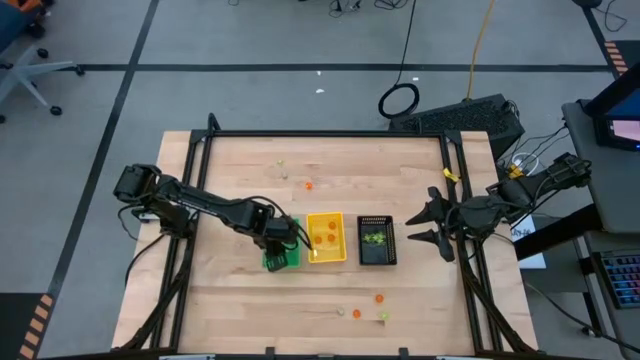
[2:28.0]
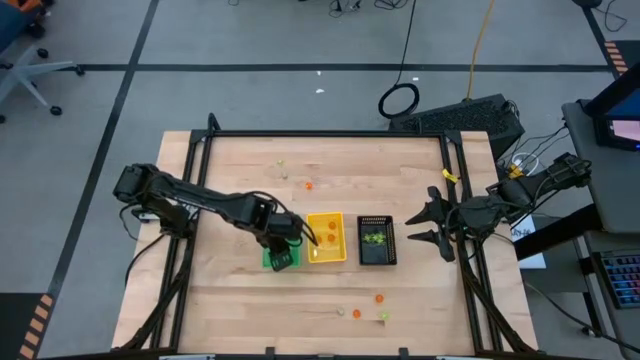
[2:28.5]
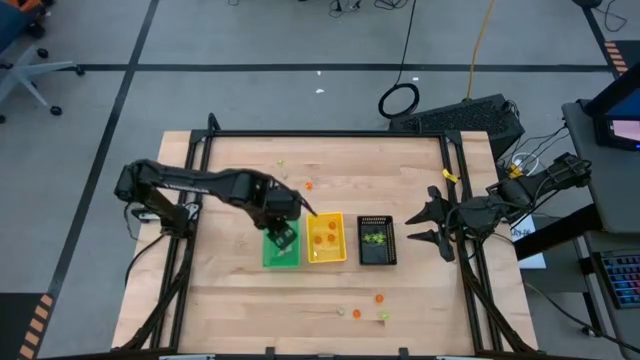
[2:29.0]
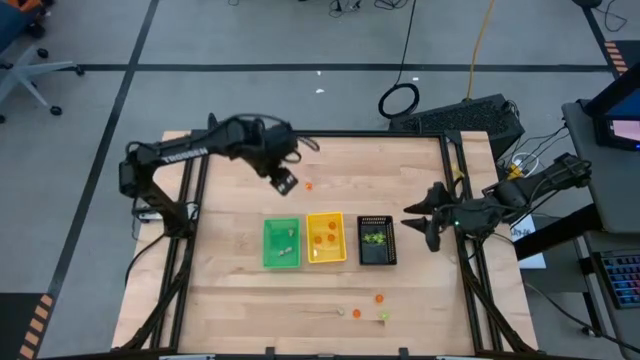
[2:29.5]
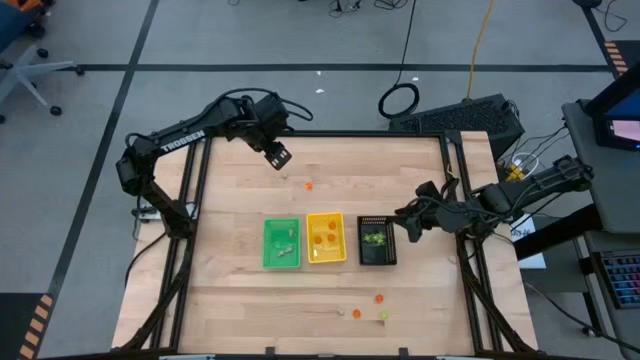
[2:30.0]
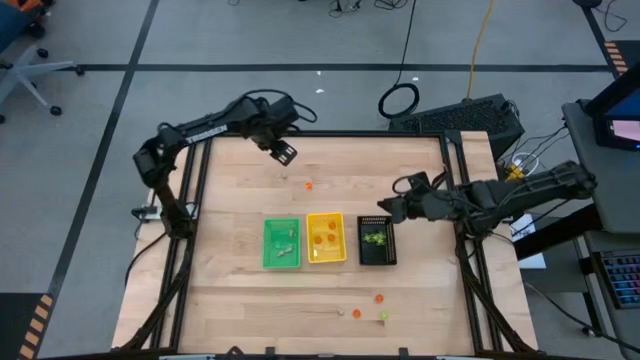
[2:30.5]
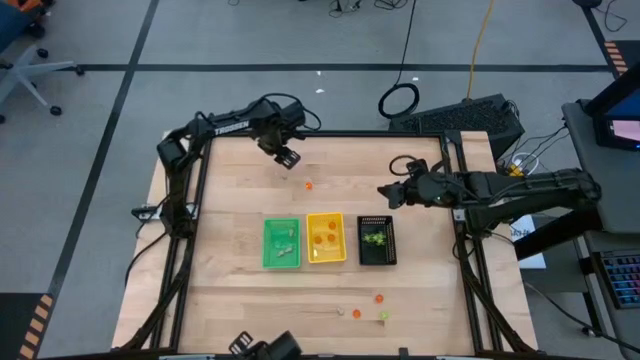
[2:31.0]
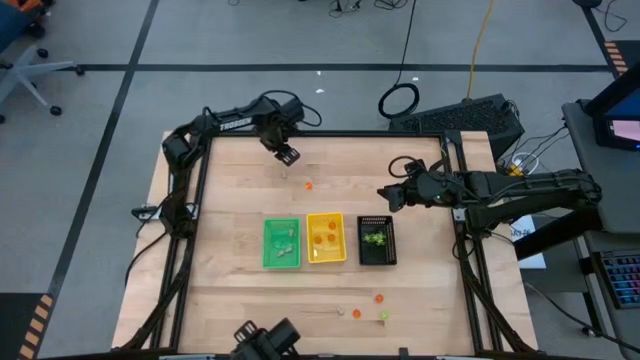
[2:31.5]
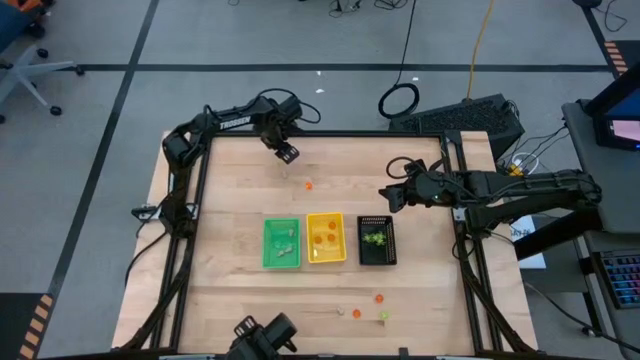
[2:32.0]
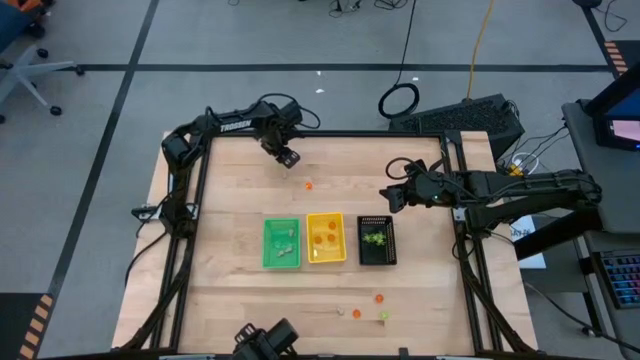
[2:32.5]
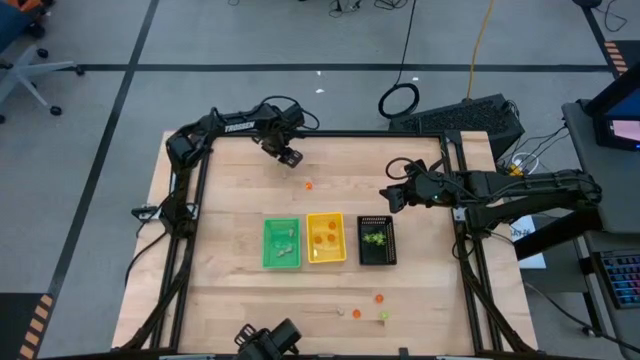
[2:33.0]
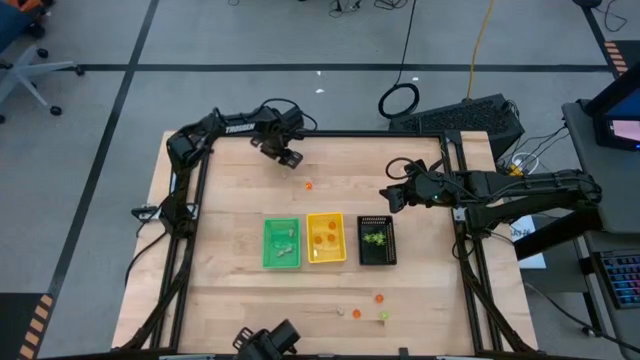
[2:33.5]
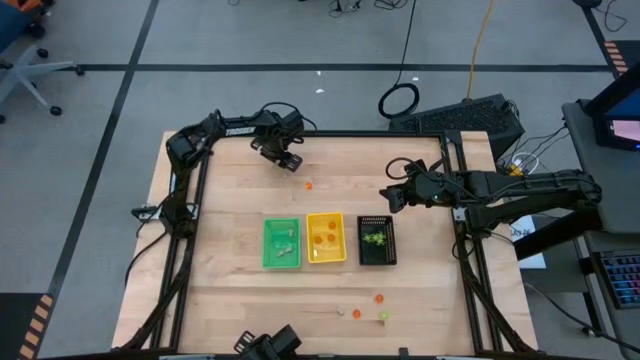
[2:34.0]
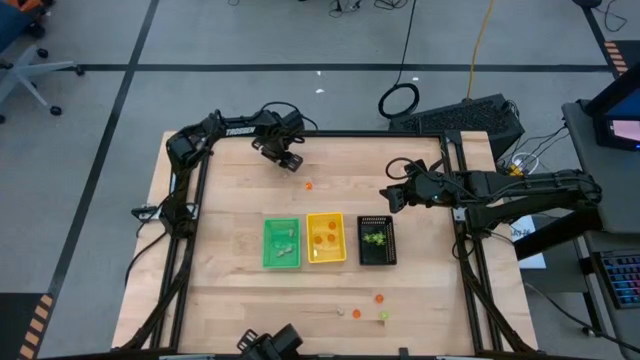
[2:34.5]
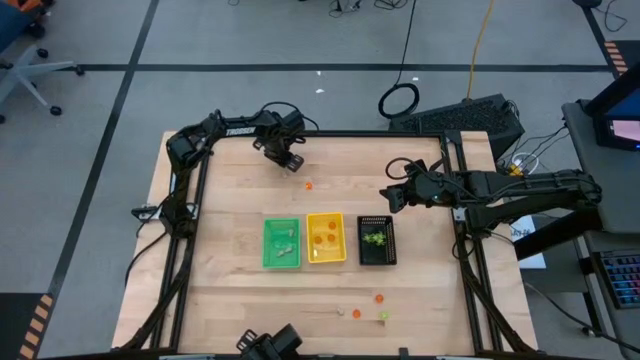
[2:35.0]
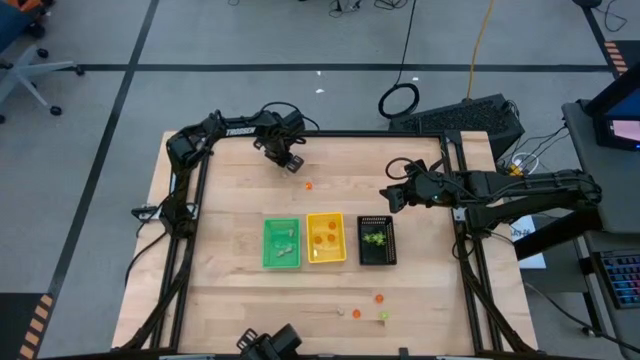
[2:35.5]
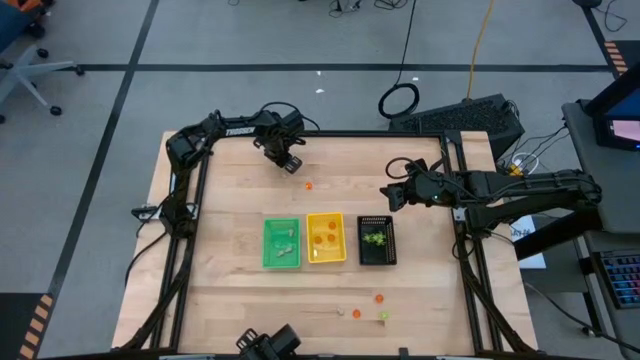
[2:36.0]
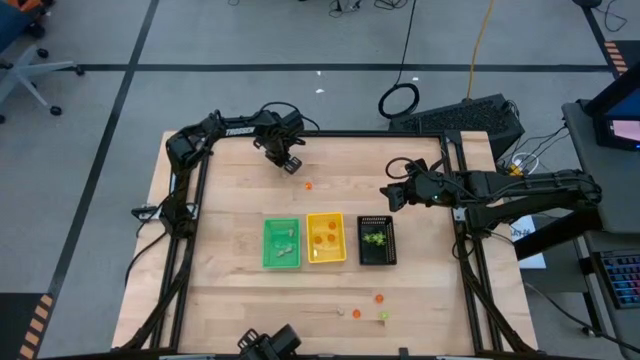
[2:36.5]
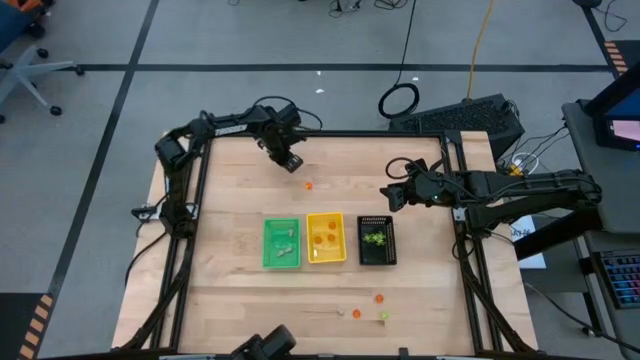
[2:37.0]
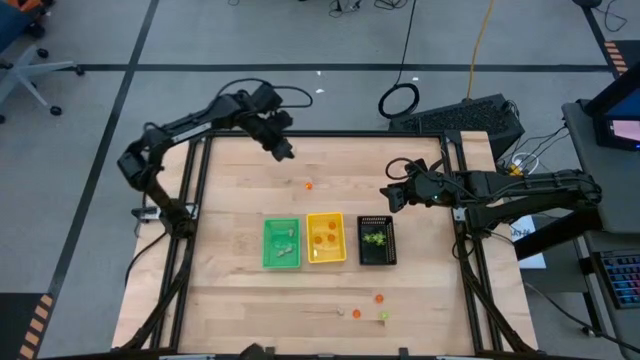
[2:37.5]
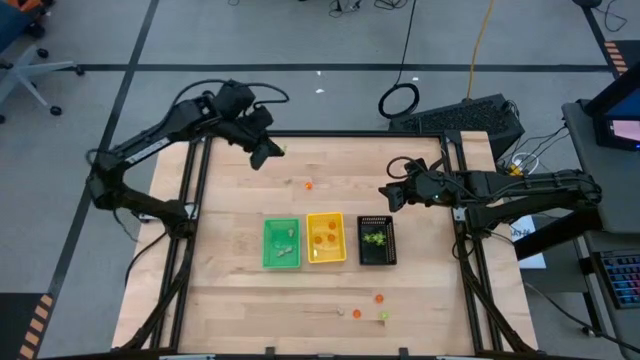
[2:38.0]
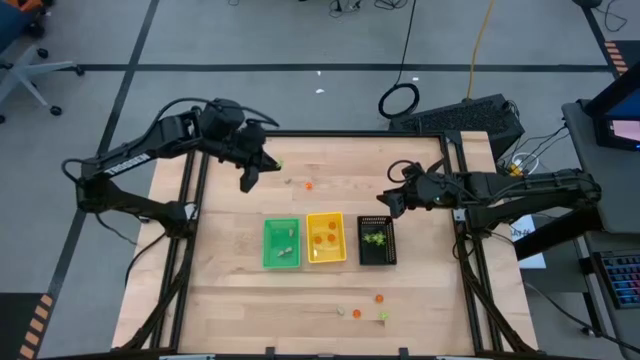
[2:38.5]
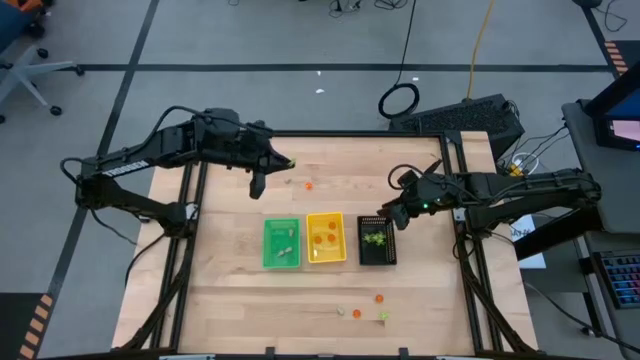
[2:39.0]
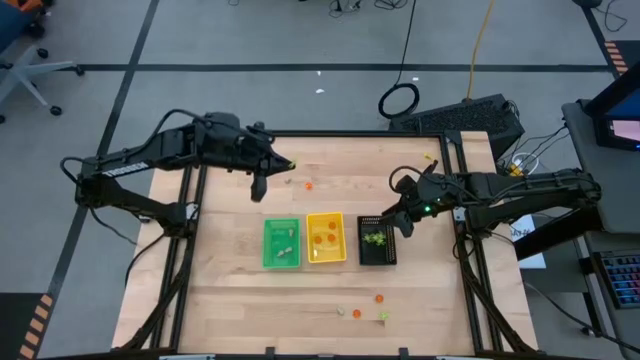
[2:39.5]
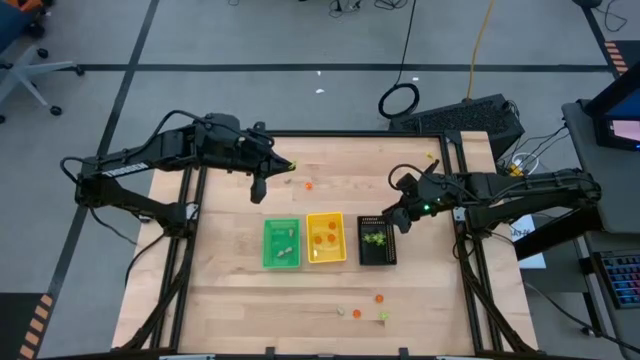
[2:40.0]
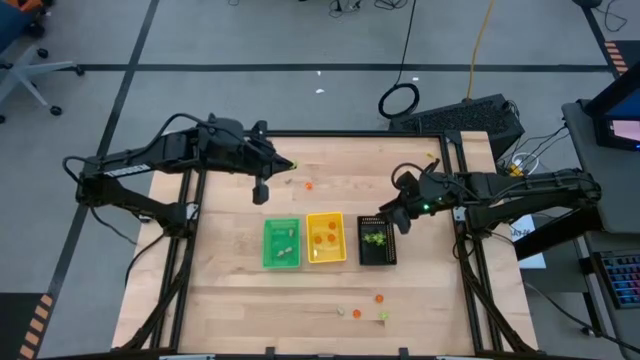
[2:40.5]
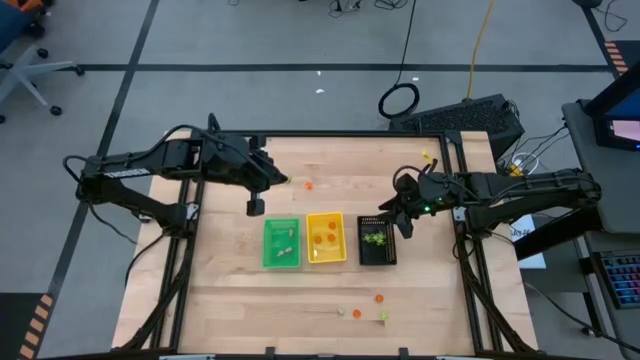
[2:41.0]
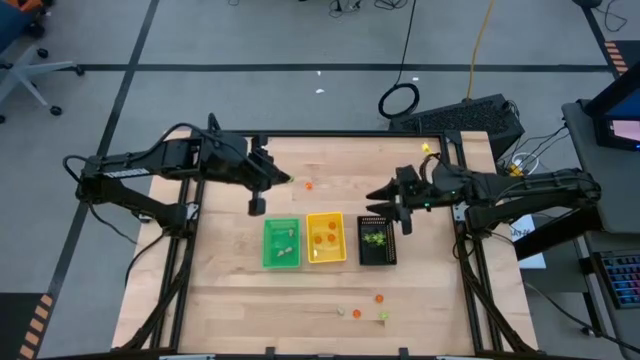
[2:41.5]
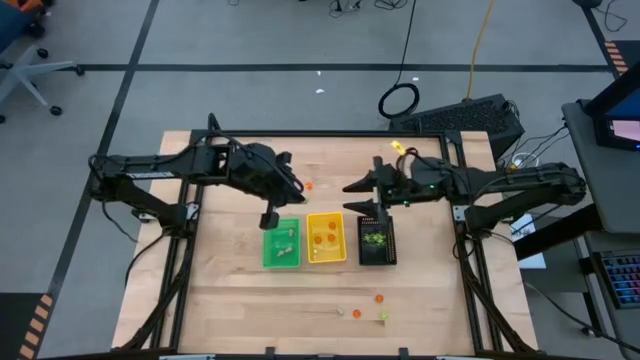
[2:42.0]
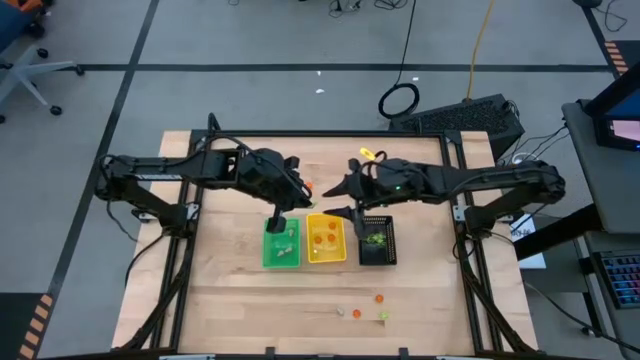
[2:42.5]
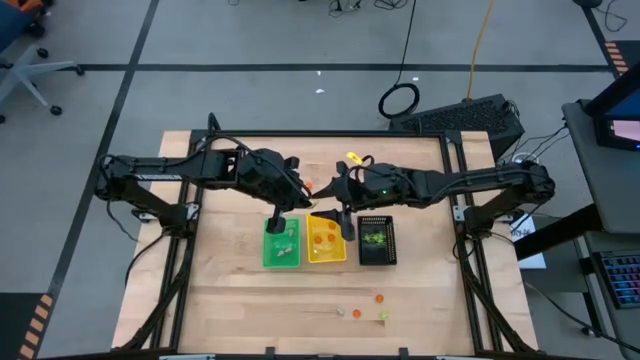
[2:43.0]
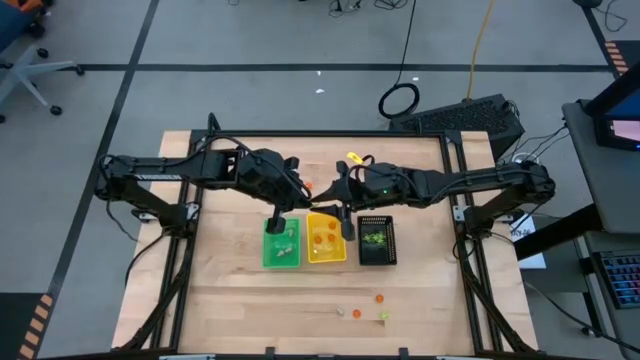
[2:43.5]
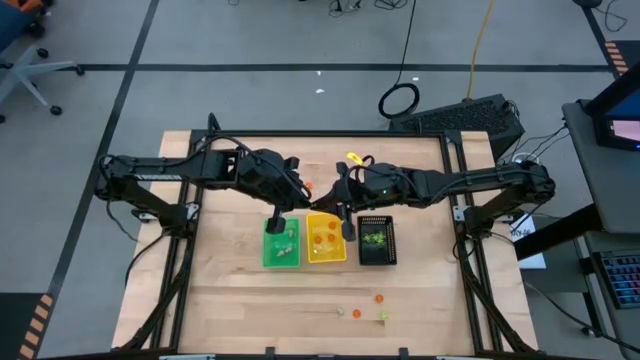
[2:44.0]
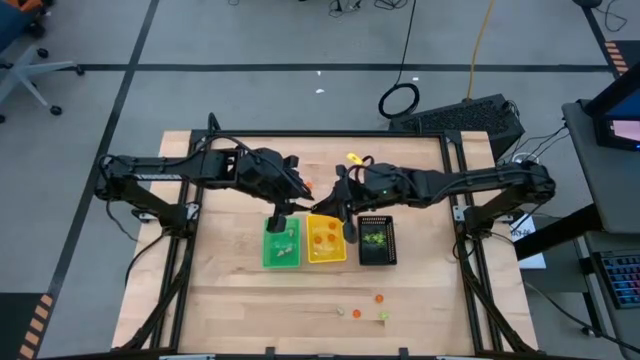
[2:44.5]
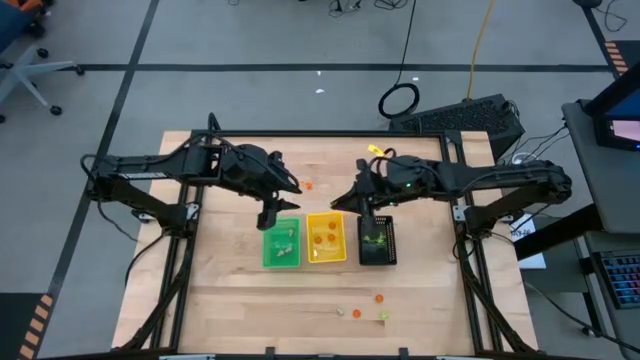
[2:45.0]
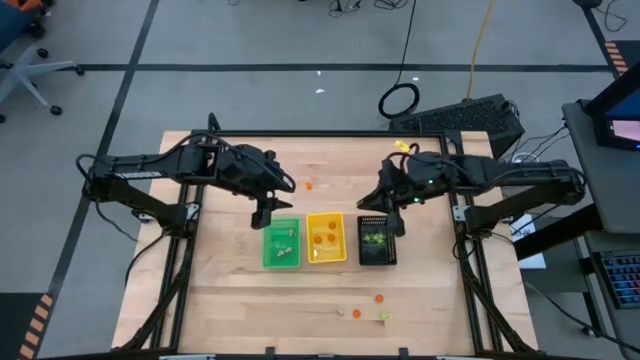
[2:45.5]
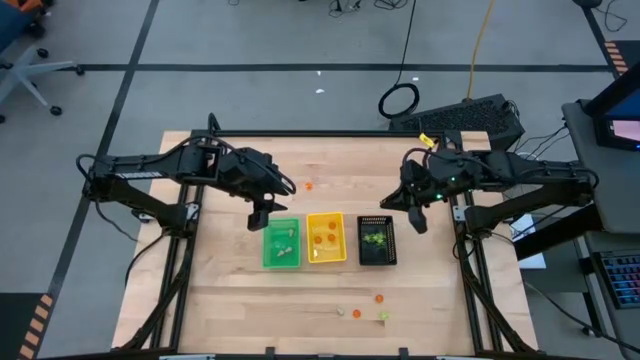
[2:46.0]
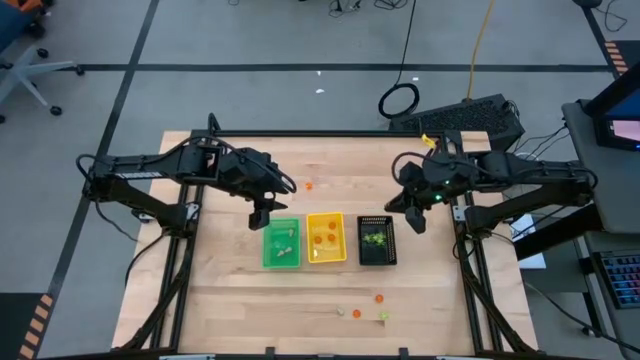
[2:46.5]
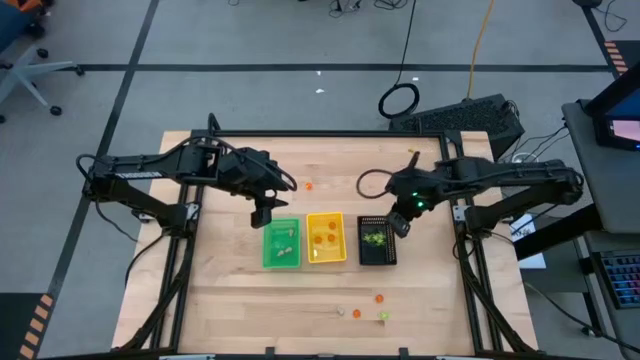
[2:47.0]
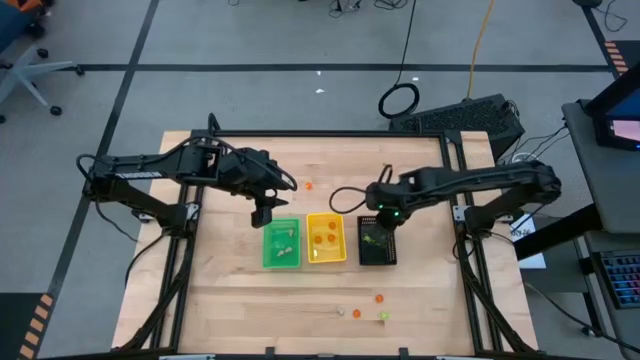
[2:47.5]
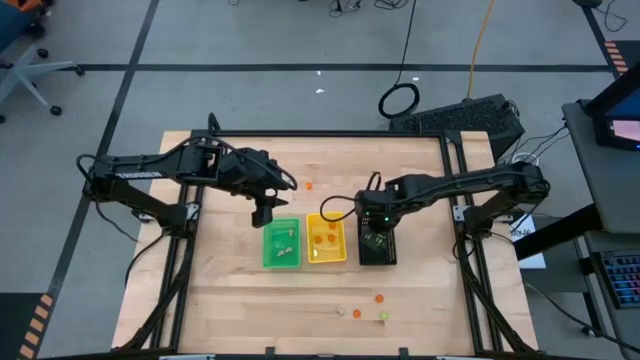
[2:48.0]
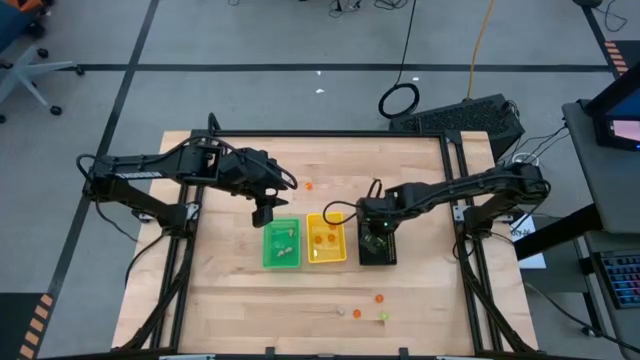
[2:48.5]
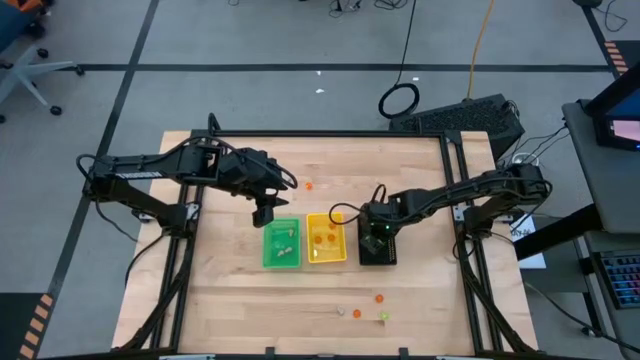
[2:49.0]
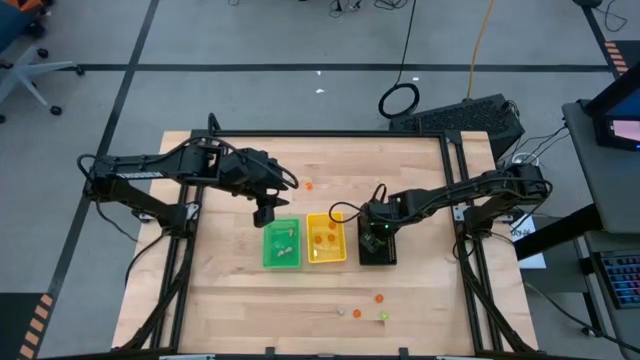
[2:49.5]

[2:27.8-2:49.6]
Task: Sort Halloween decoration
Put the green spider toy into the black basket
